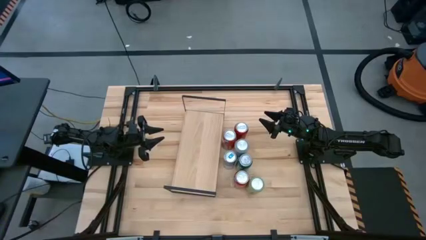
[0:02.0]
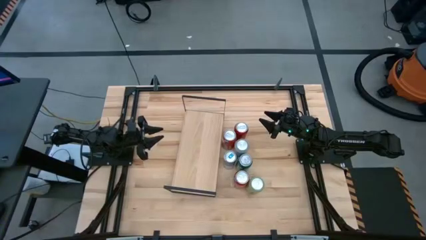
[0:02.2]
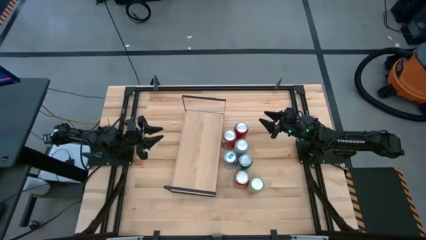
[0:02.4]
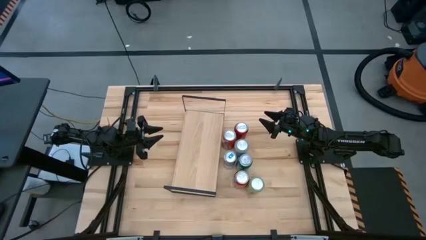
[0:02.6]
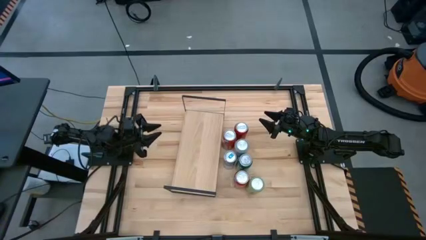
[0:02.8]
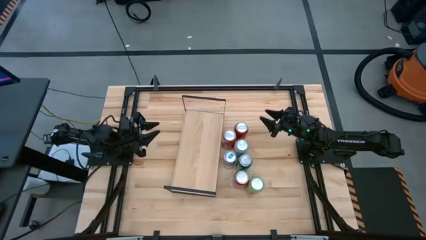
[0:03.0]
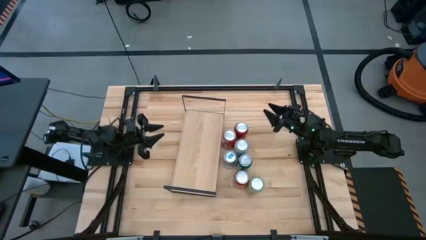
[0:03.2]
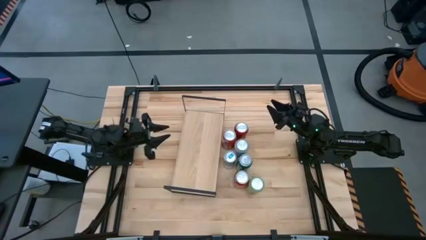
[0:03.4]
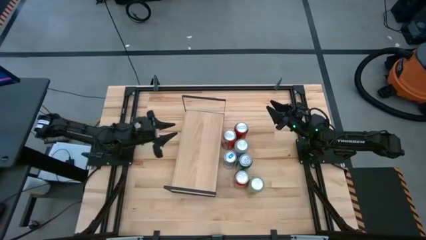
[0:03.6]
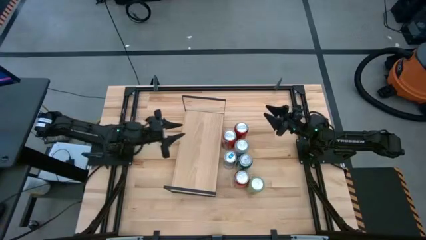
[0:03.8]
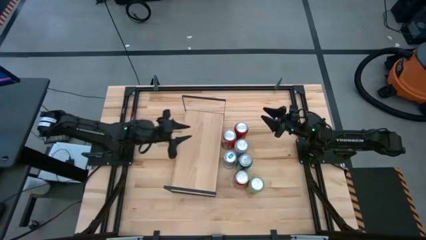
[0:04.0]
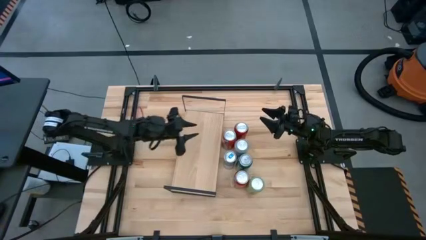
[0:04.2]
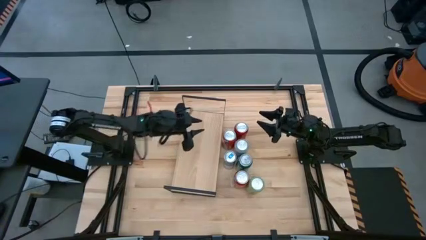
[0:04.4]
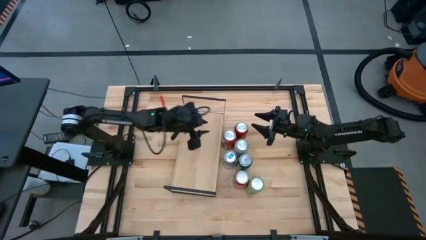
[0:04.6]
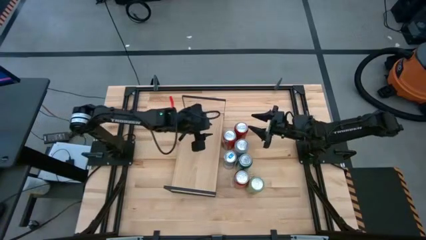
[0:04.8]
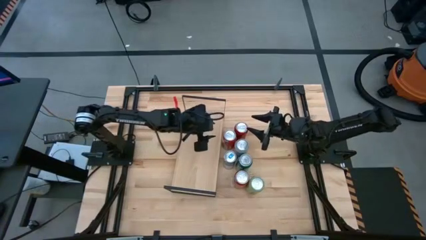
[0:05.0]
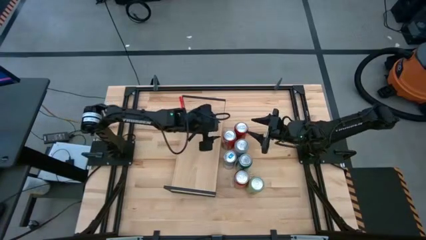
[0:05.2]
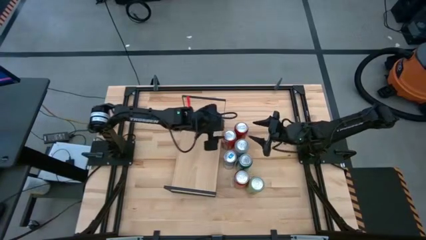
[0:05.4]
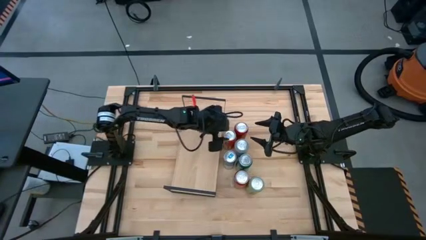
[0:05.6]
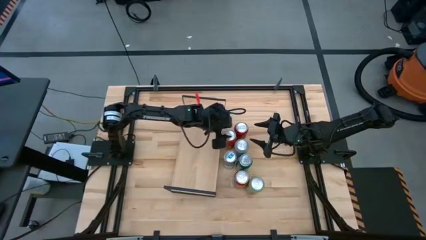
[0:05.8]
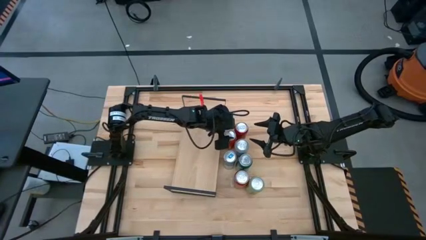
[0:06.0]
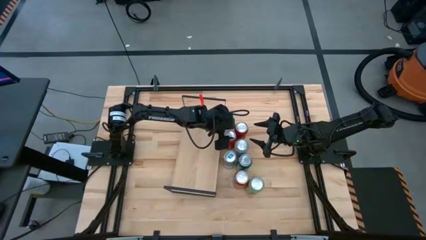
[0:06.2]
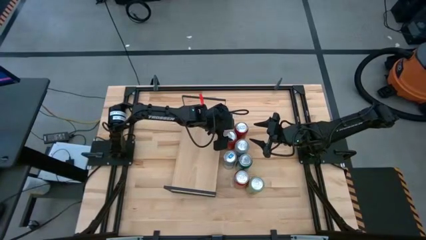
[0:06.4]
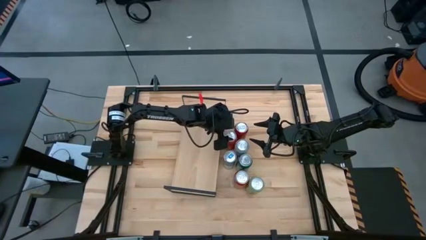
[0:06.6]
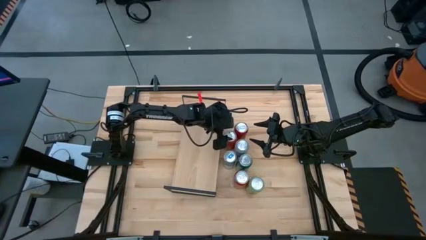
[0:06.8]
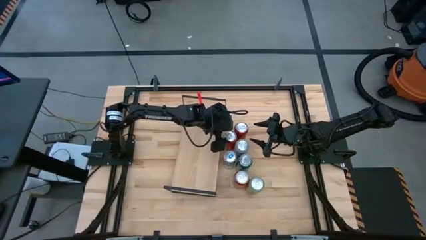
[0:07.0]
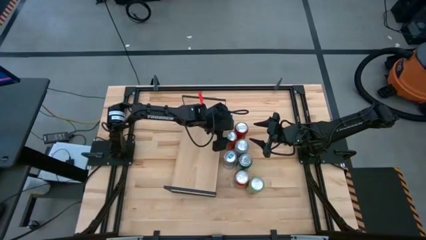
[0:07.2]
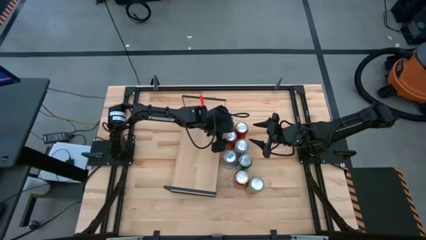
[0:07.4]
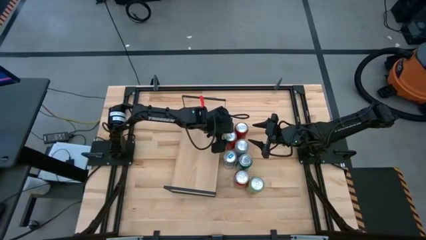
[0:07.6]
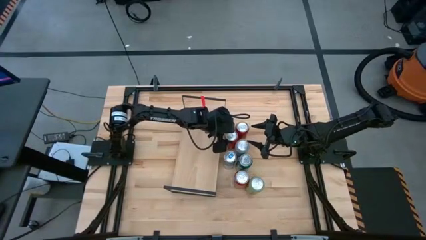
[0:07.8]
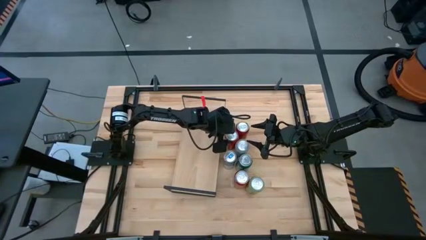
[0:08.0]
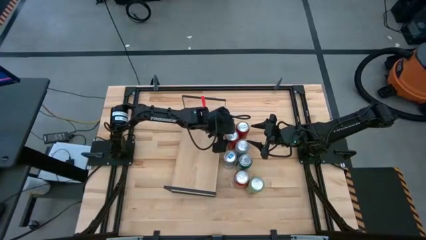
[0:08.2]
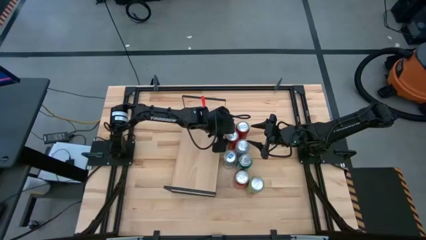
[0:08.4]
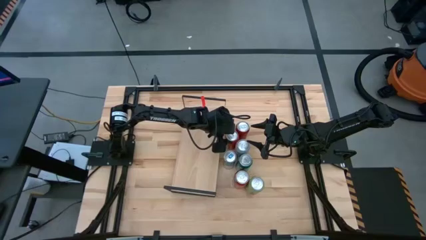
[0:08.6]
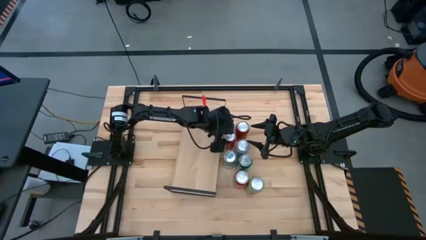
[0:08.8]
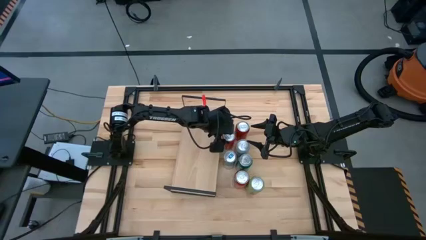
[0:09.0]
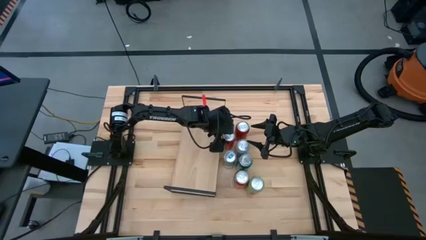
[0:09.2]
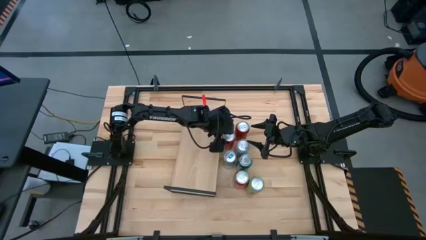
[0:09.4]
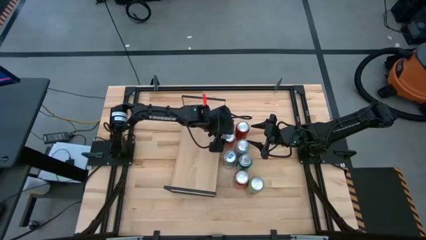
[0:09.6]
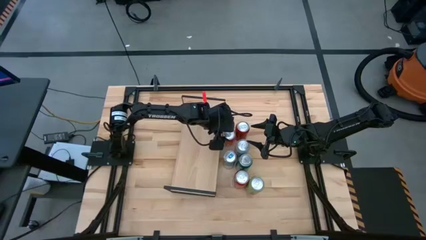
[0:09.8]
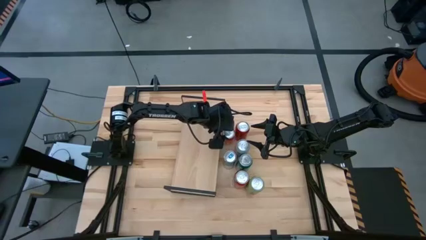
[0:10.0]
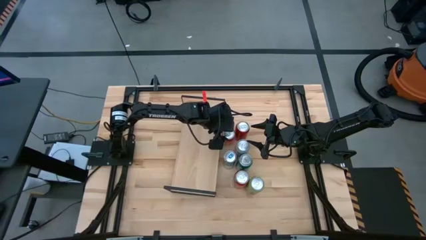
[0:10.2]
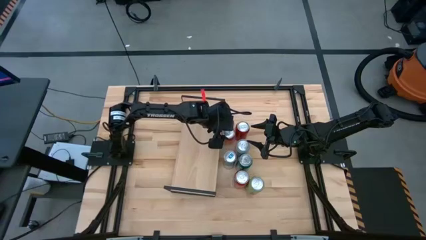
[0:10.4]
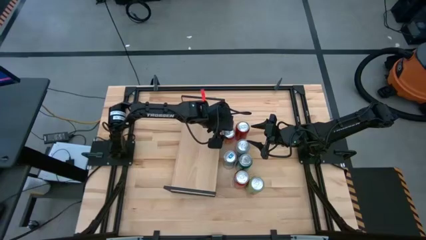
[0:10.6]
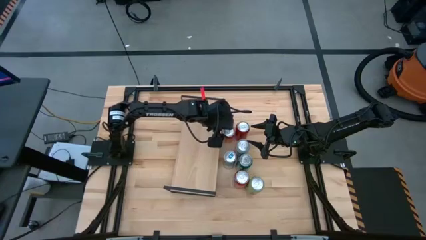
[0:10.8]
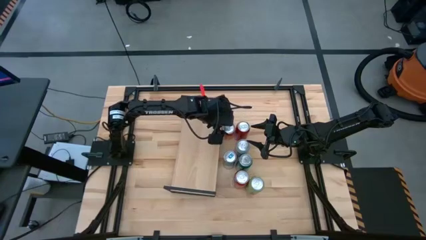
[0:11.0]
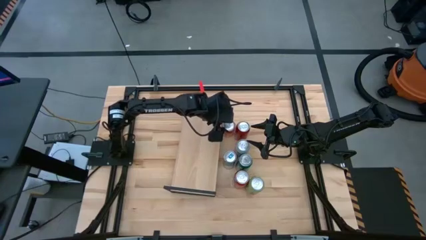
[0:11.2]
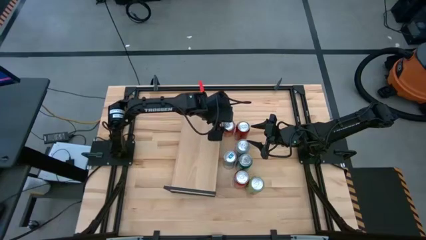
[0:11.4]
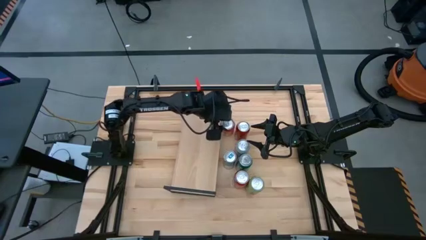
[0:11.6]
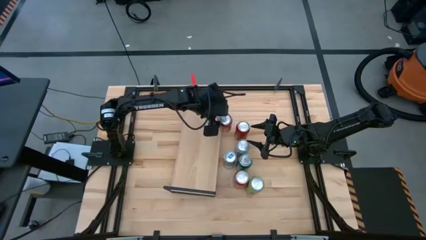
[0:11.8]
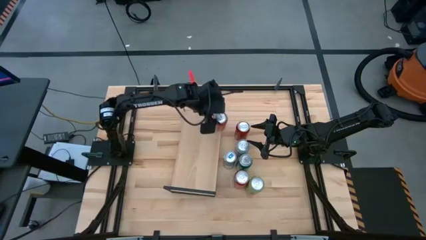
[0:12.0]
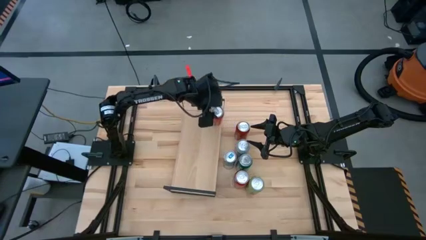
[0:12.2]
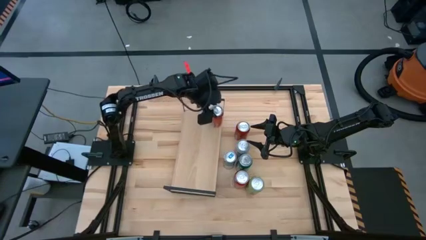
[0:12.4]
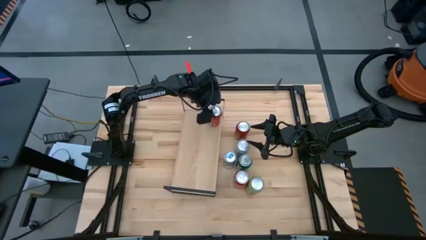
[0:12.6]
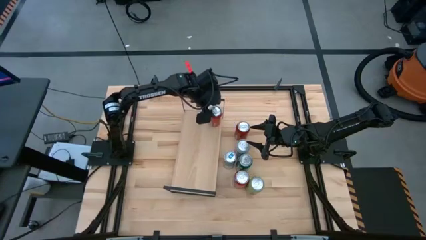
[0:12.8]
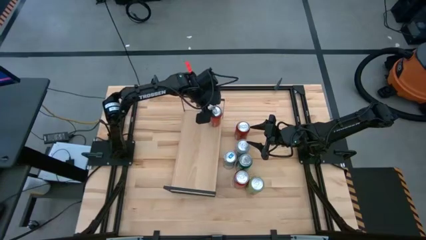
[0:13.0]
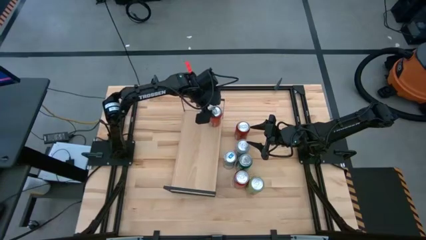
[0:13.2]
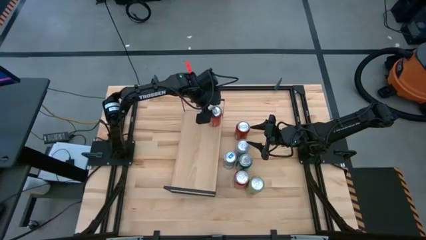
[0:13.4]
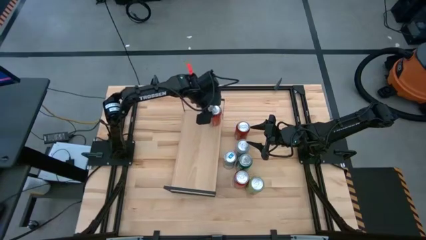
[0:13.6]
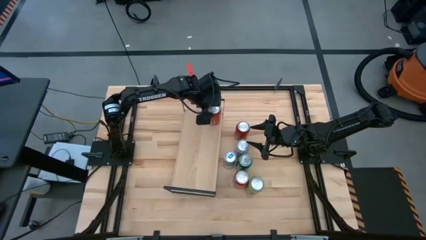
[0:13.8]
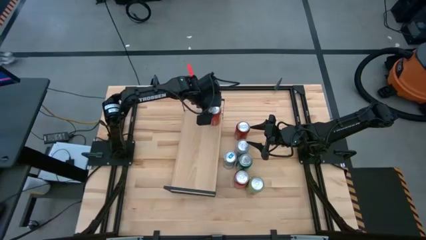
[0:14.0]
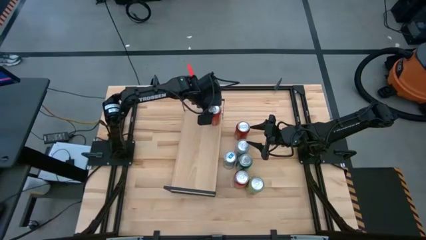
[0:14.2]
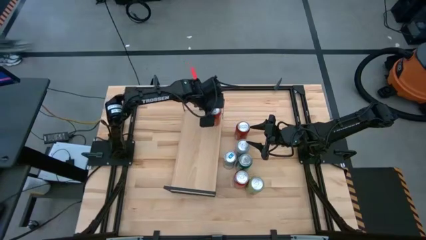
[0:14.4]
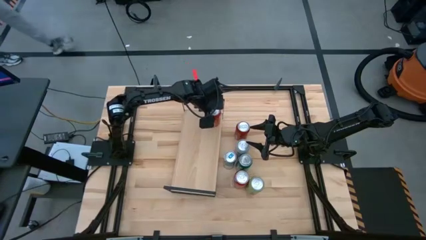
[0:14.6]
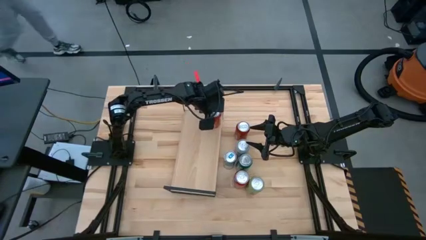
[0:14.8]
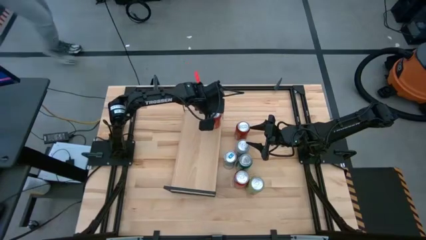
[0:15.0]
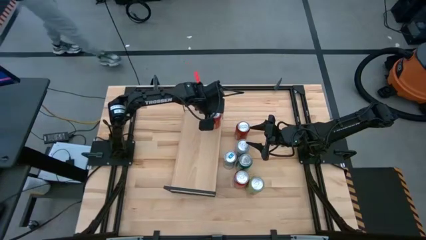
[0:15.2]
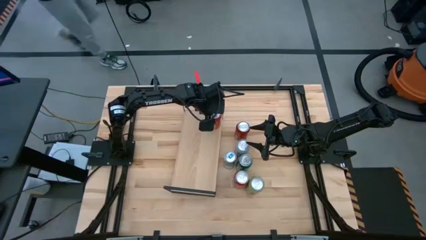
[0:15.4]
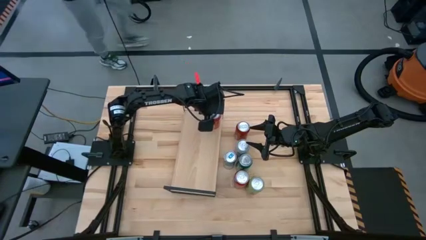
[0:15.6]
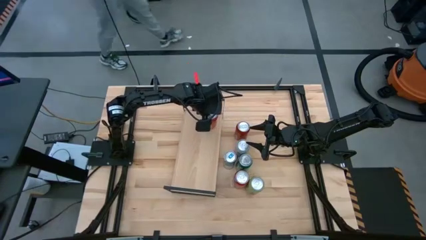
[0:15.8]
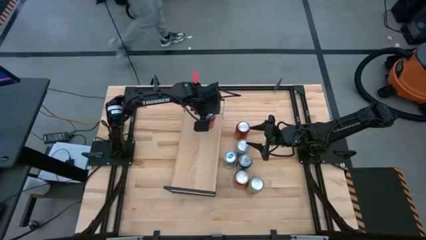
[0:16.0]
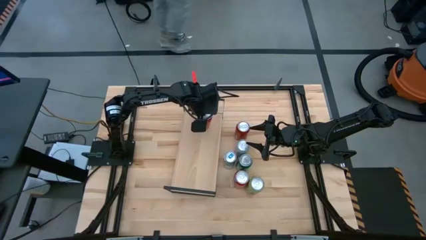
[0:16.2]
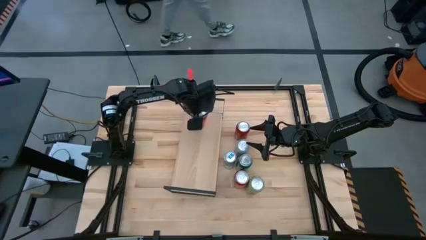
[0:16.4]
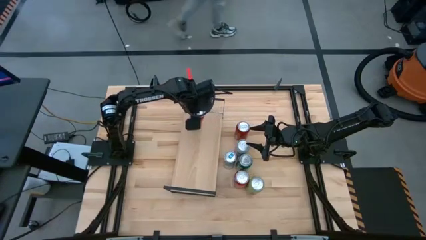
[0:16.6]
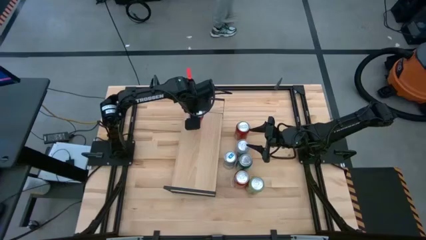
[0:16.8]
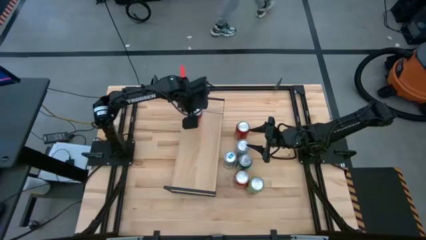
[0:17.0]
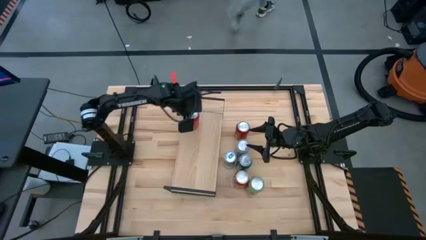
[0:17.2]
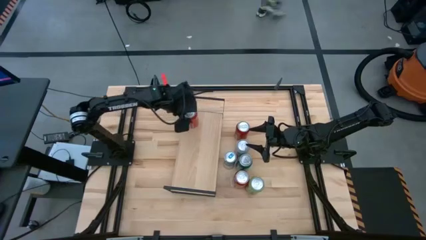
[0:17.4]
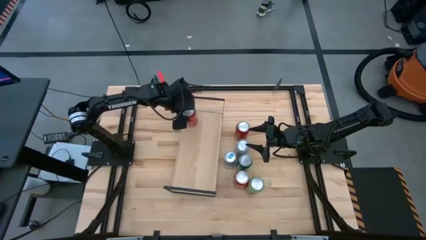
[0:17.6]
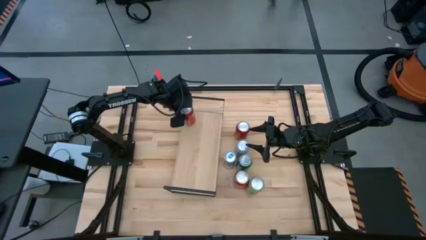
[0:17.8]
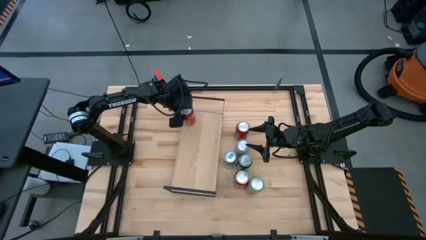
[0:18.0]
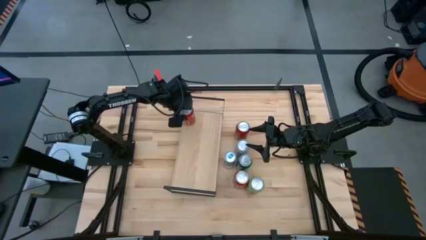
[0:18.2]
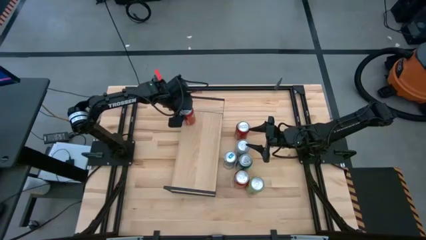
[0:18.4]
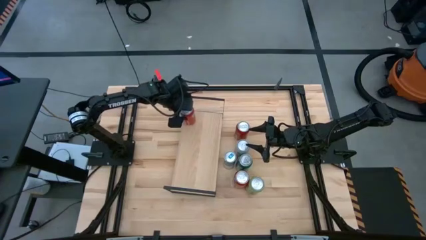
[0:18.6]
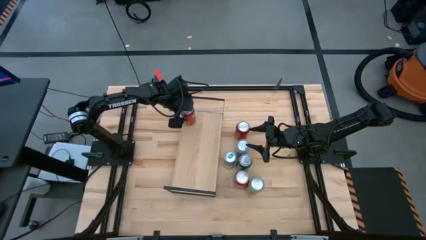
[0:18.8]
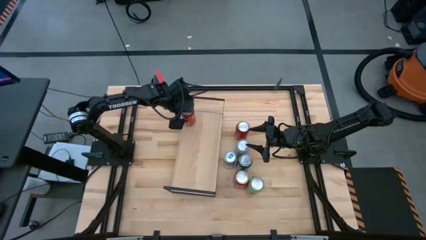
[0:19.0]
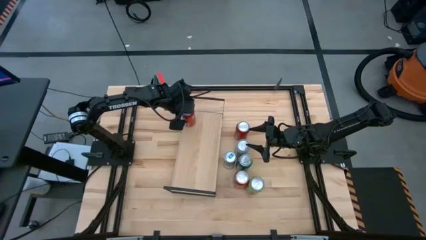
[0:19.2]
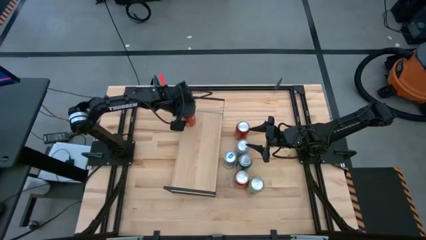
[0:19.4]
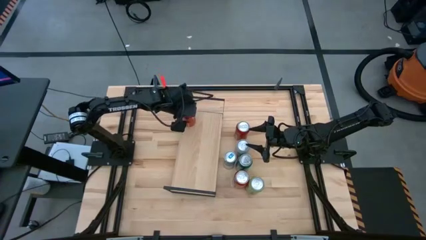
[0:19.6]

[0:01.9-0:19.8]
Task: Place canned beverage on shelf
Put the top orange soda can on the shelf
